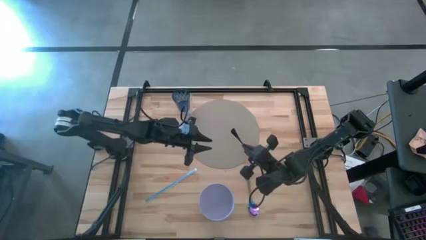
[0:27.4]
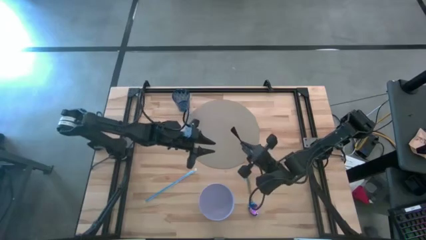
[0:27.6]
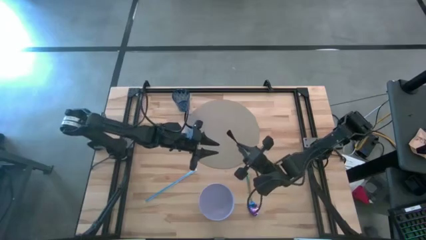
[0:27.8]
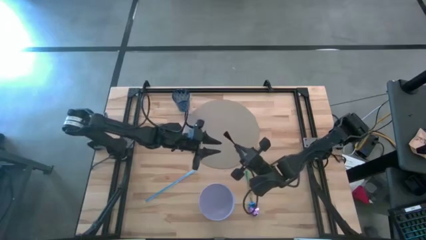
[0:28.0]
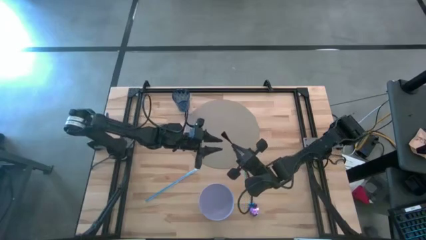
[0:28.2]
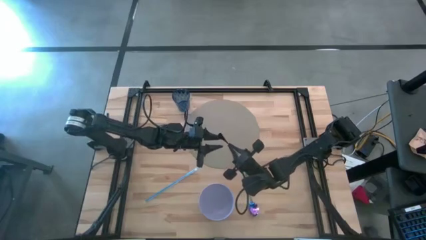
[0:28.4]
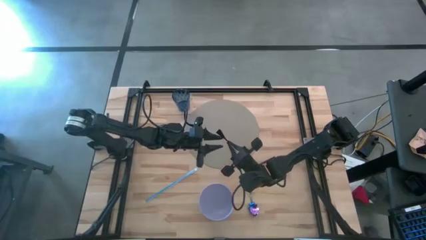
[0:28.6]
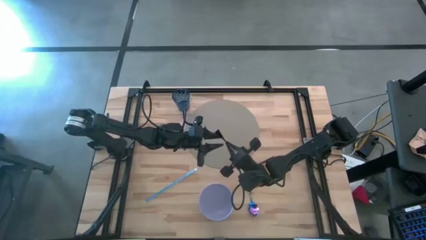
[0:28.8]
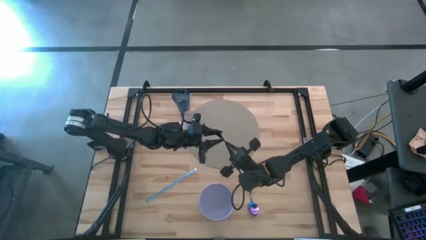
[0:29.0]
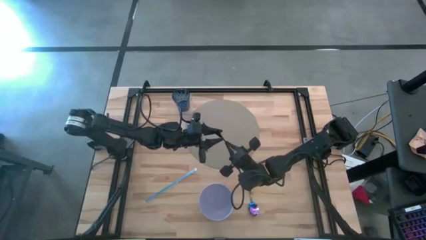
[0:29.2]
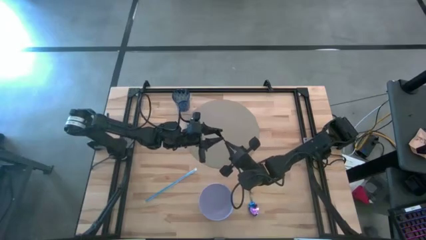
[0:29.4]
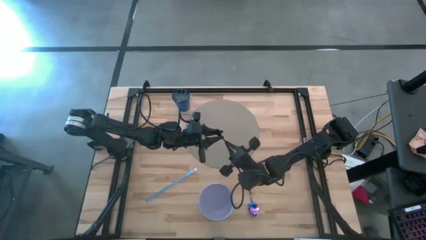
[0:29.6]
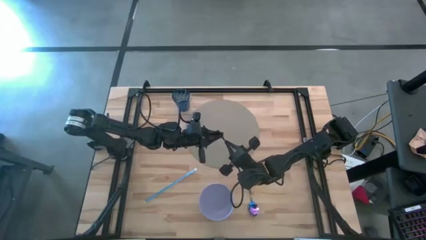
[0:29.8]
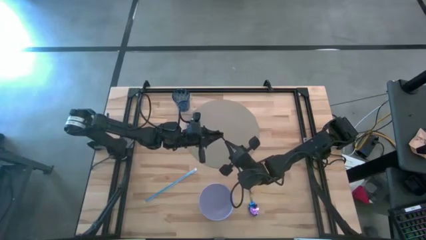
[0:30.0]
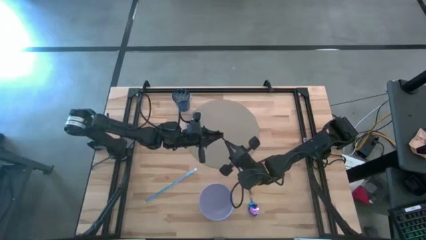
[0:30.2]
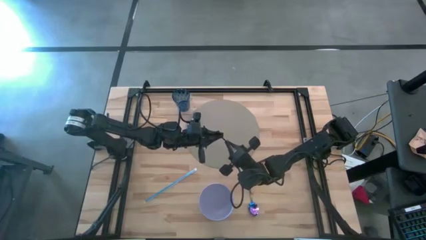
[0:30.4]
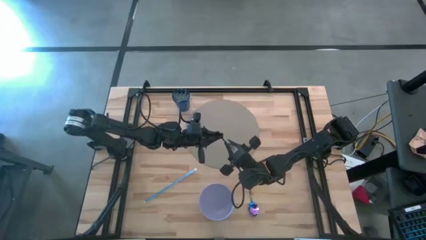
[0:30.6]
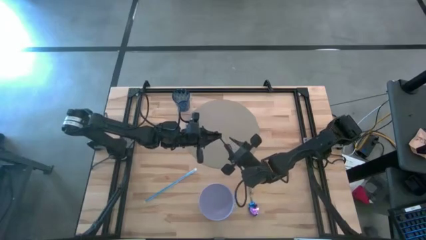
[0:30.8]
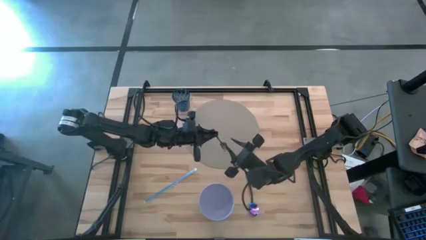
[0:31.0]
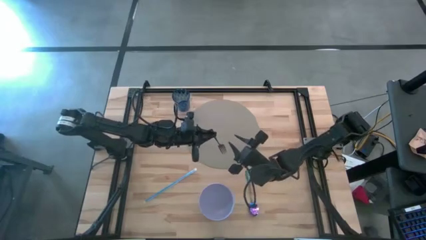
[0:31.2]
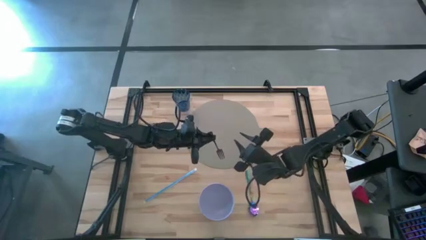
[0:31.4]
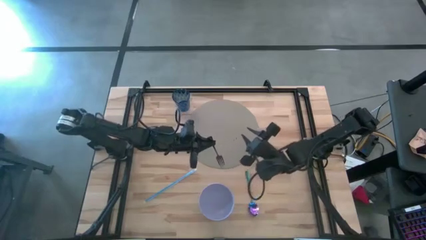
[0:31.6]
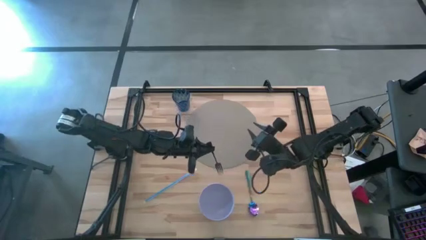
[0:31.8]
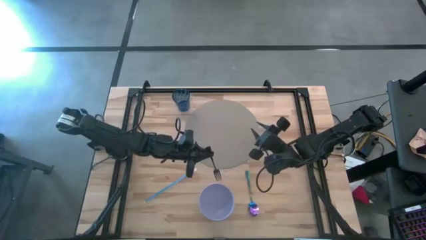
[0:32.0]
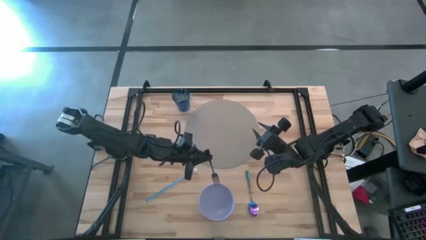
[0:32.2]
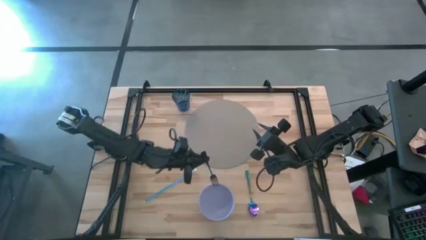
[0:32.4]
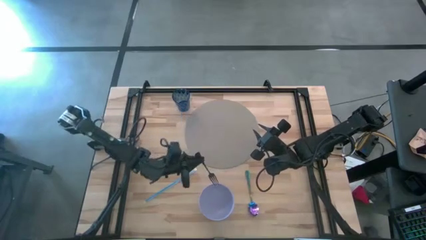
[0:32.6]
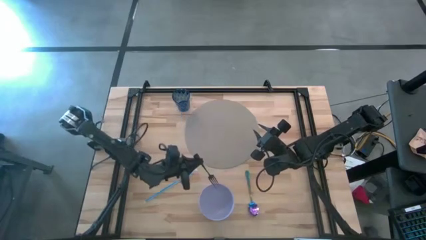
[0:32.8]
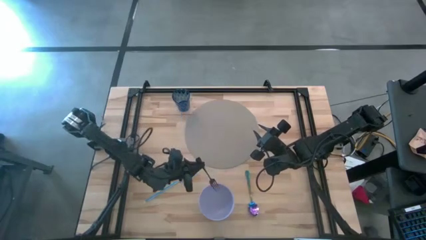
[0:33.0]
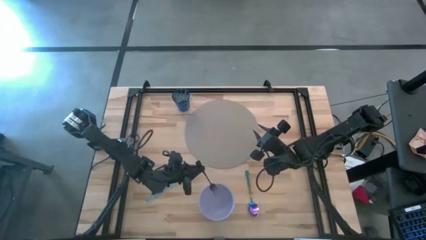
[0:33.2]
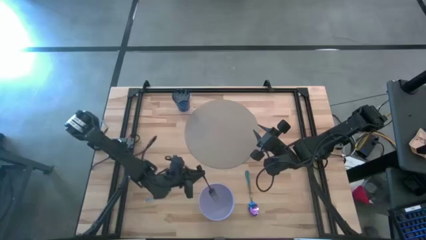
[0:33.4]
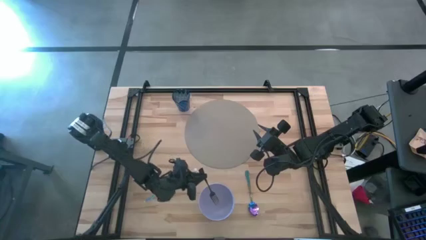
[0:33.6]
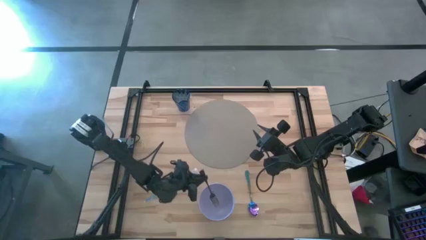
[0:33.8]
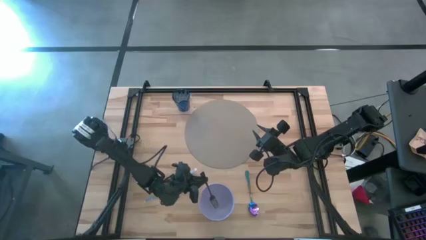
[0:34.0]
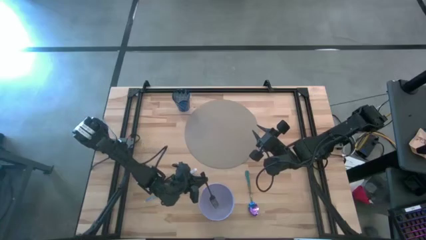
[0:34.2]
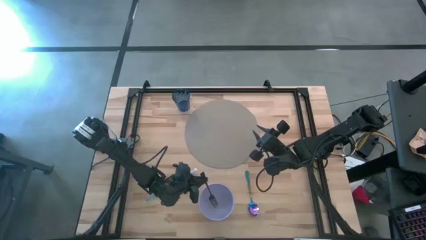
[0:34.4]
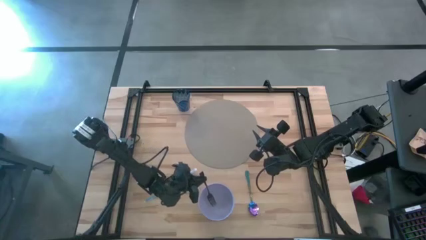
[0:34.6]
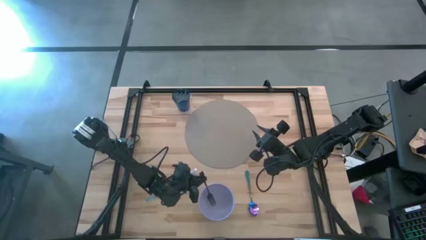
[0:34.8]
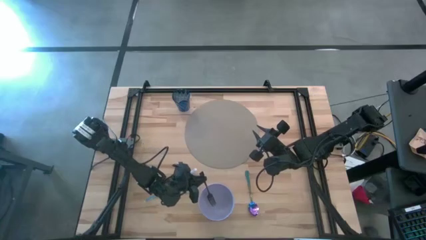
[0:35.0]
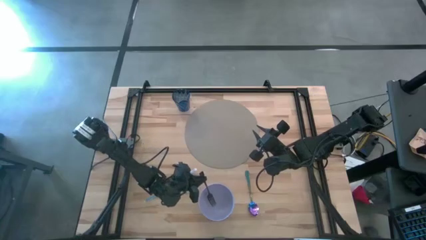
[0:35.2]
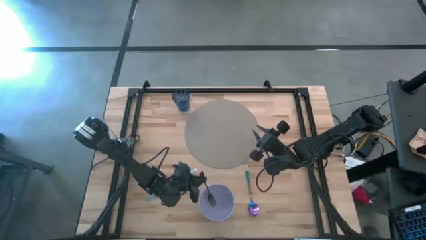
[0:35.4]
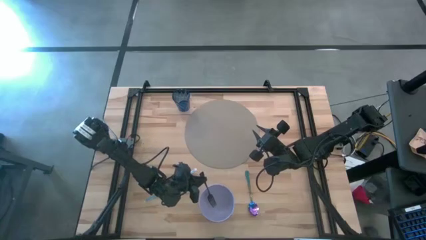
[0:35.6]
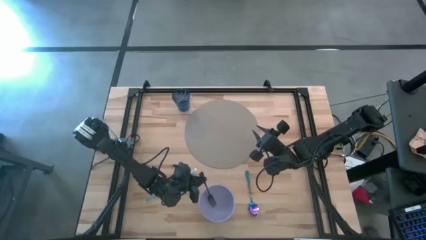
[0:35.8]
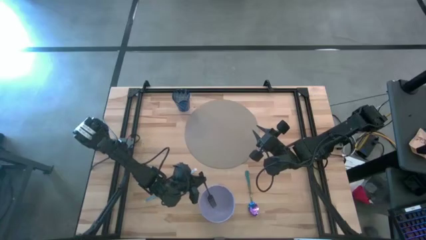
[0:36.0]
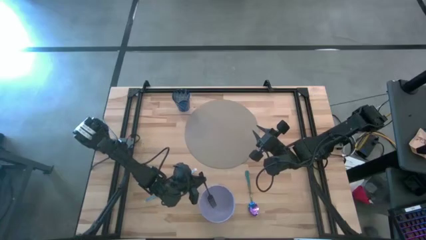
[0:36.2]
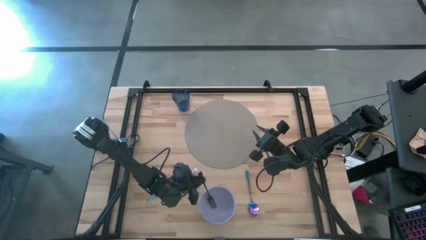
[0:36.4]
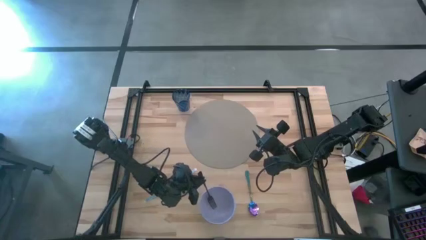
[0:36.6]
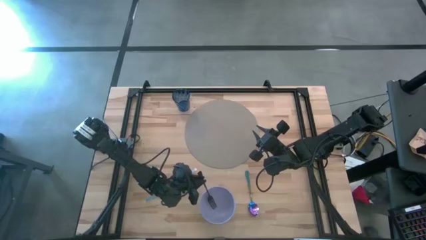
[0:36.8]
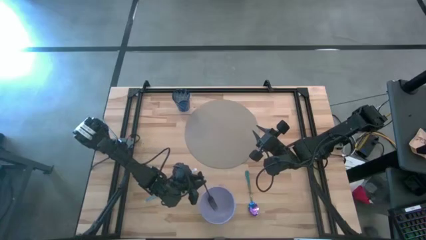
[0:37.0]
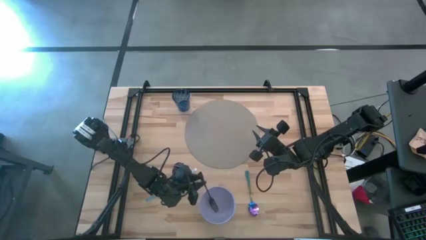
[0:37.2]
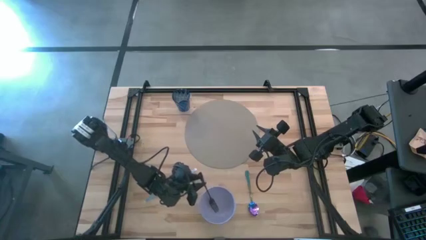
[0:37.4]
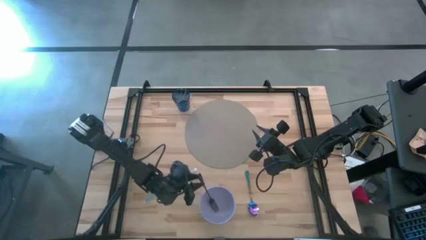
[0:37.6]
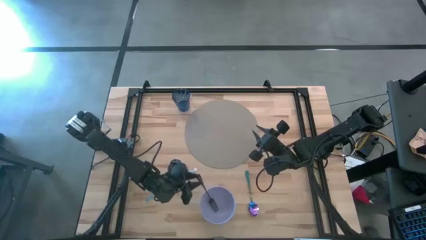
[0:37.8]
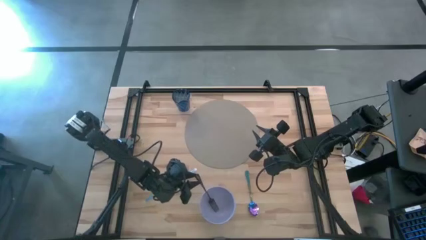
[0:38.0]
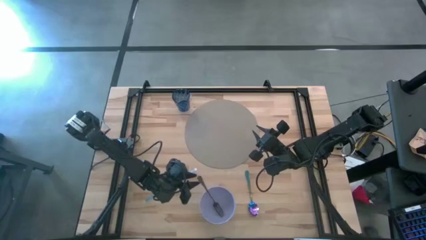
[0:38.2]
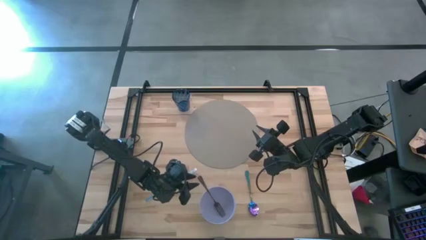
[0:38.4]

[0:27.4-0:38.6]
Task: Pick & Place Utensil
Put the black fork into the purple bowl

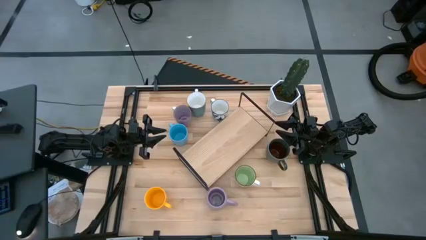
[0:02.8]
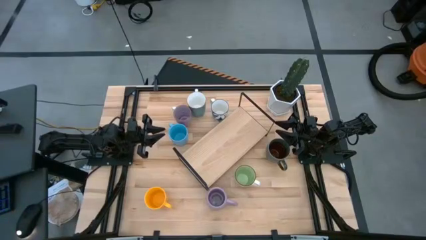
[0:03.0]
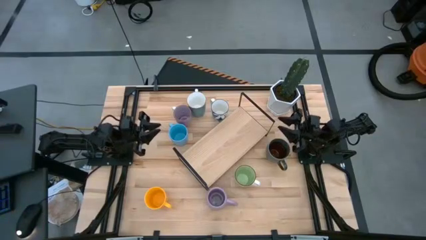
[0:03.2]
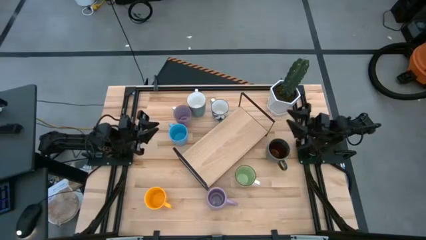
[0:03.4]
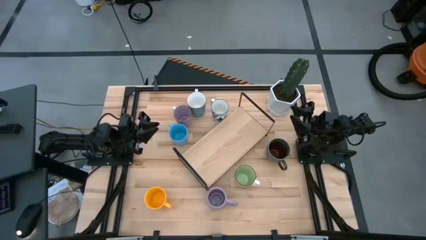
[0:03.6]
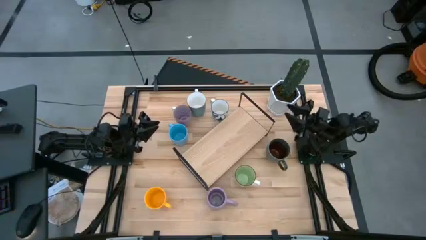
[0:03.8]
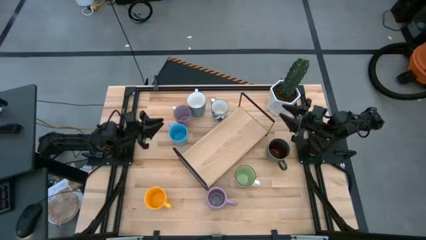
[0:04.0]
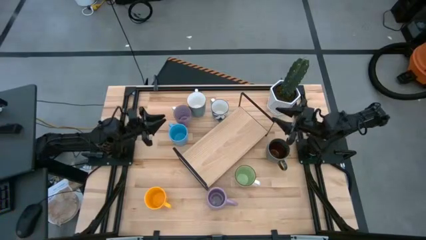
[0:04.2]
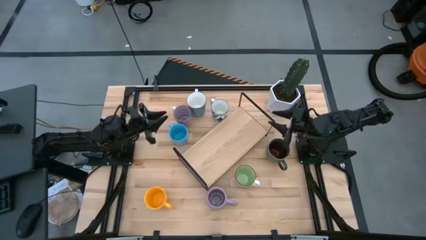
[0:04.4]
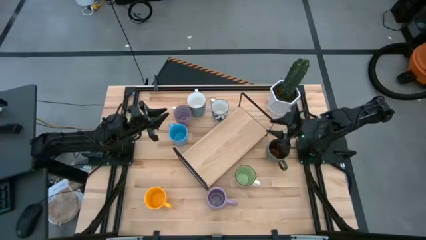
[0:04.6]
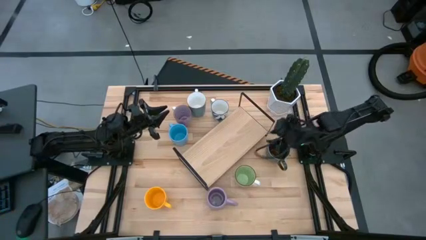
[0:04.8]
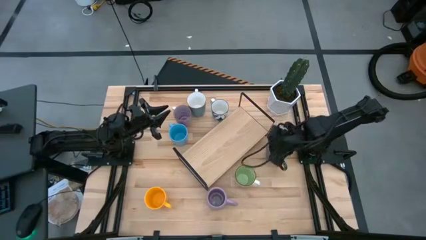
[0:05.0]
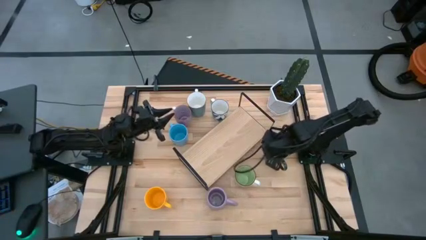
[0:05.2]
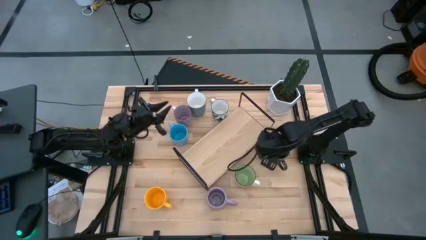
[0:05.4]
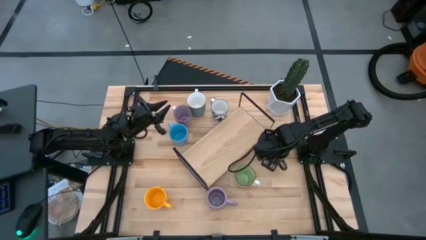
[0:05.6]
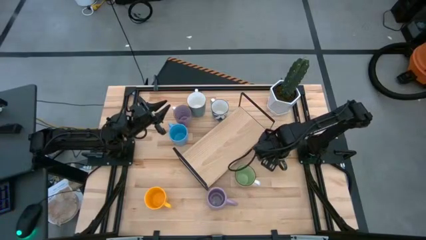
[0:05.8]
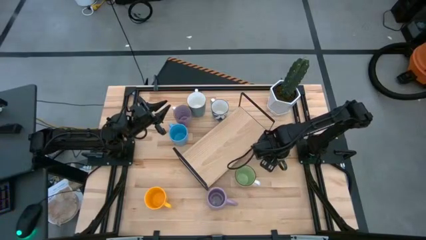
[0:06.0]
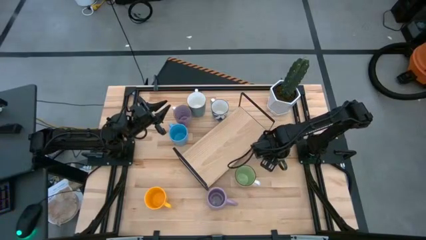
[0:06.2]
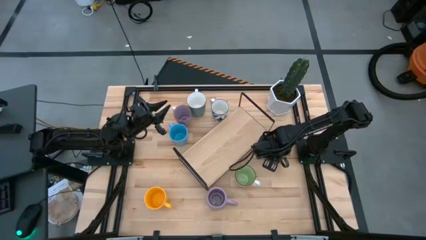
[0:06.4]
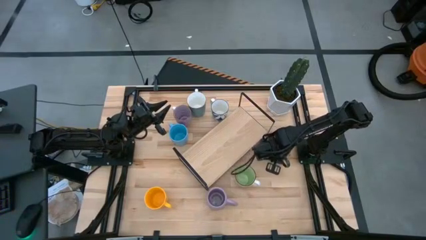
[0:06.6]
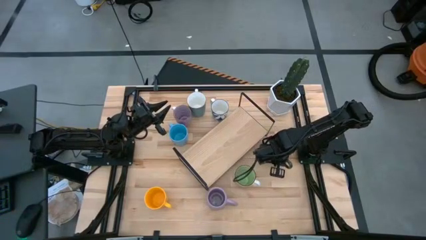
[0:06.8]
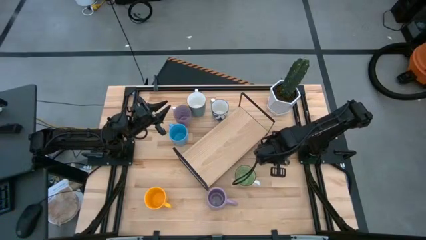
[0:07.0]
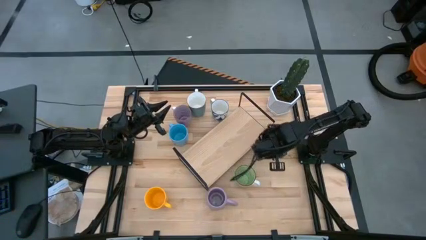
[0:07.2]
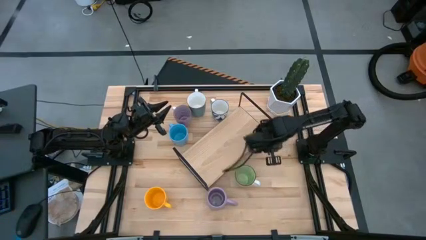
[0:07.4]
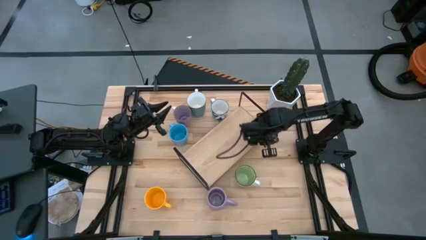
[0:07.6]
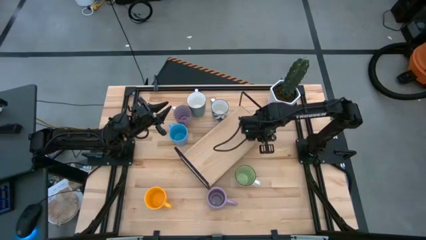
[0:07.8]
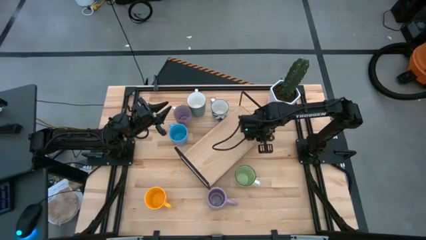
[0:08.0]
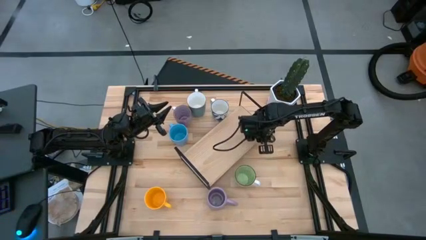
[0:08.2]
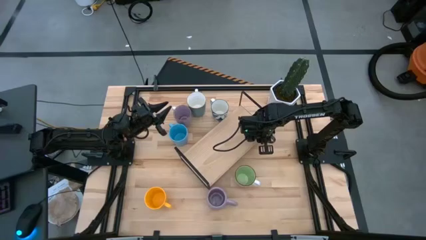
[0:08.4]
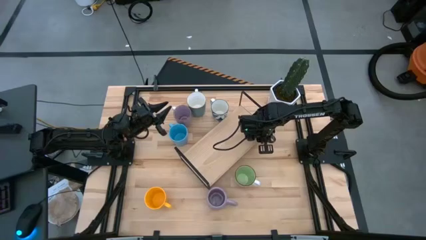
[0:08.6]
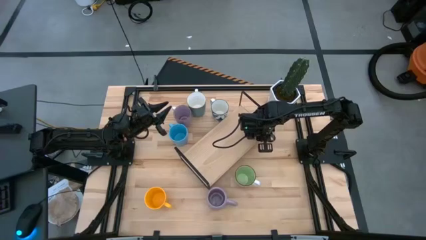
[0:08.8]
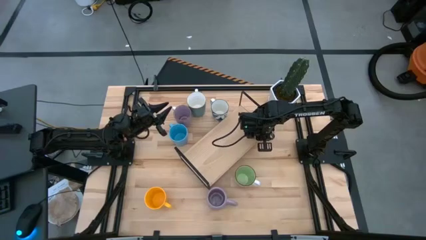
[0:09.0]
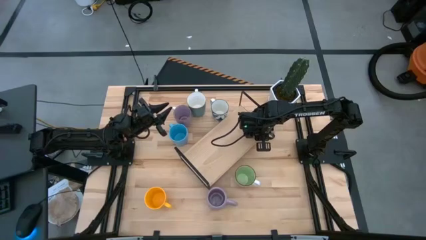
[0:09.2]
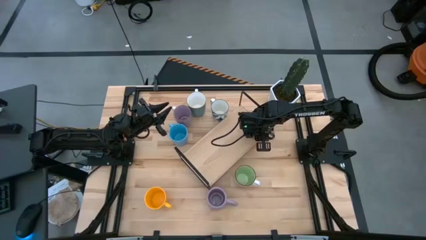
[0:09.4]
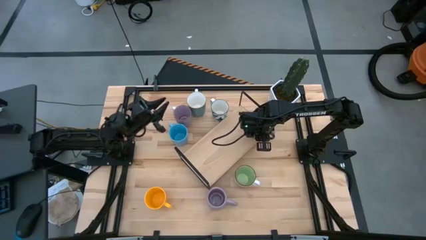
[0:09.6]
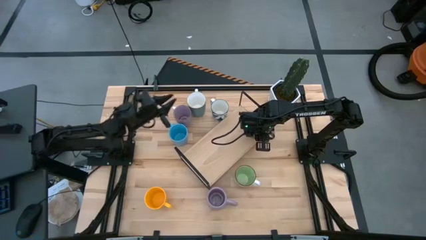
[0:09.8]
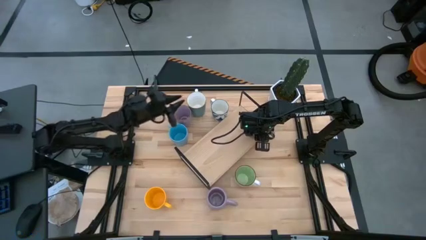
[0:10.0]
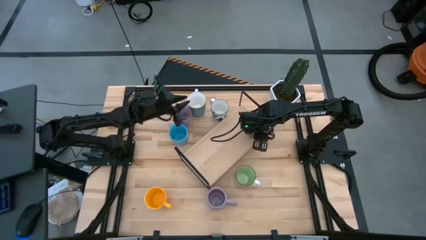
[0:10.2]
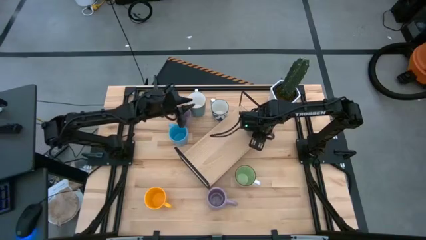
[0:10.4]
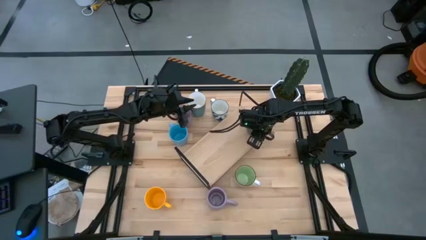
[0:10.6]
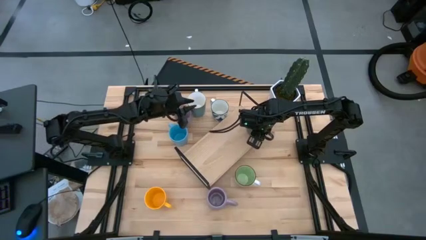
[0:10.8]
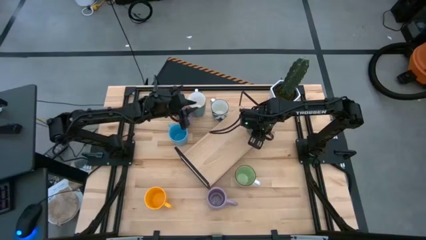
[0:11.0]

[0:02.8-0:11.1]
Task: Place coffee mugs
Put the dark blue patterned mug on the shelf
